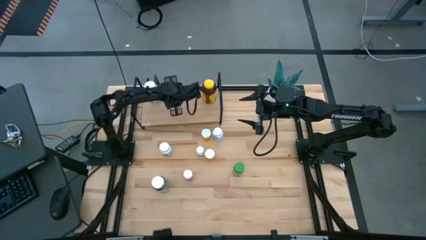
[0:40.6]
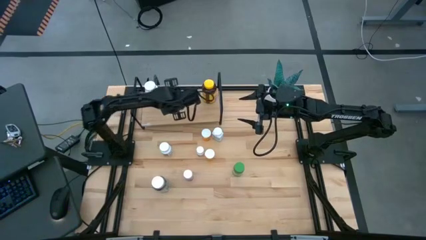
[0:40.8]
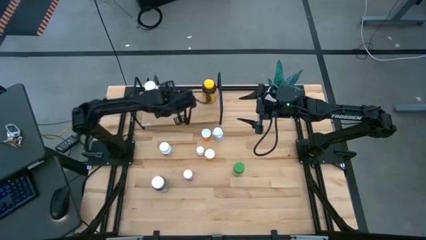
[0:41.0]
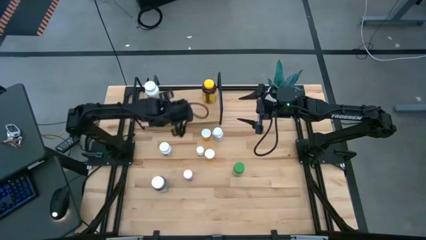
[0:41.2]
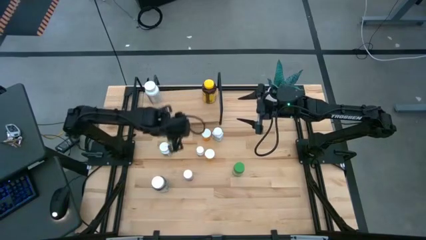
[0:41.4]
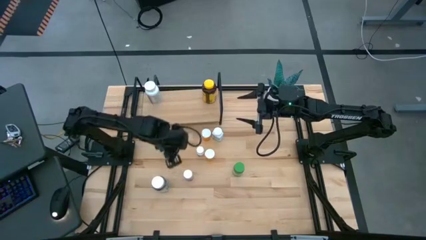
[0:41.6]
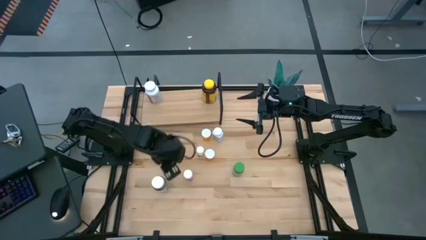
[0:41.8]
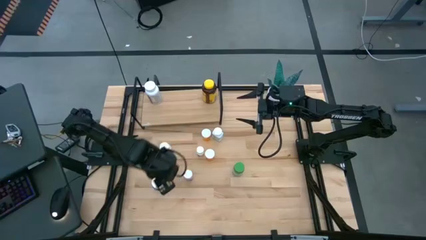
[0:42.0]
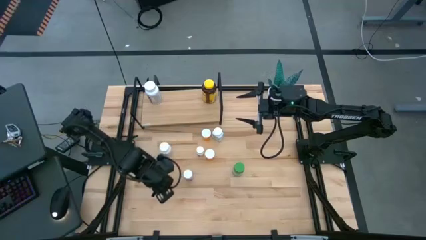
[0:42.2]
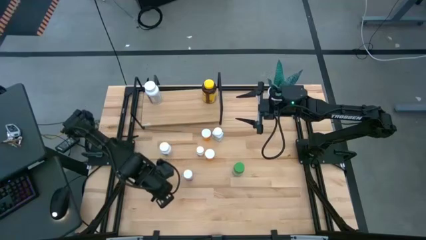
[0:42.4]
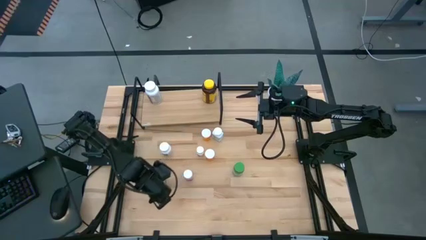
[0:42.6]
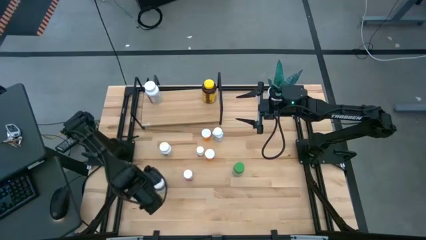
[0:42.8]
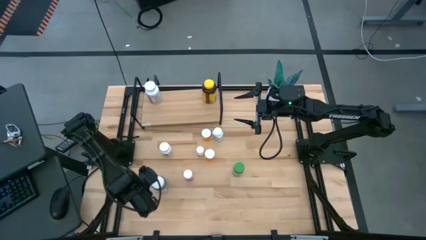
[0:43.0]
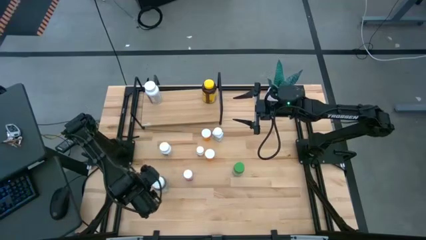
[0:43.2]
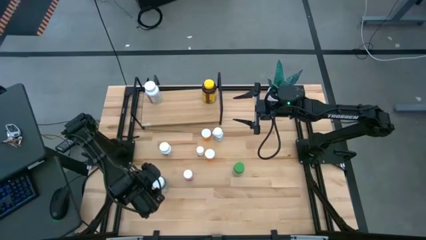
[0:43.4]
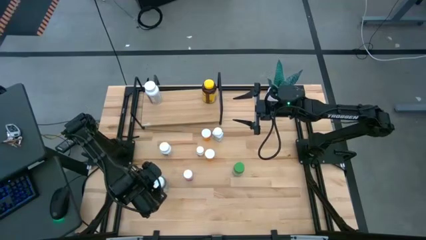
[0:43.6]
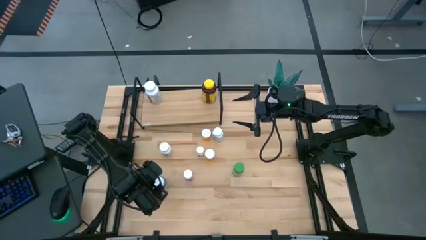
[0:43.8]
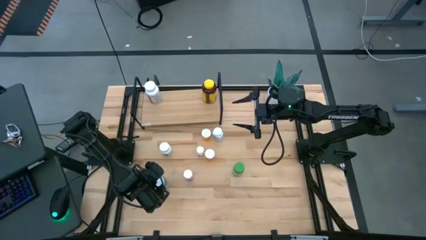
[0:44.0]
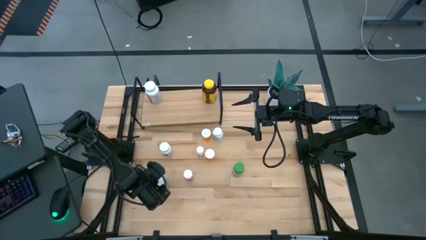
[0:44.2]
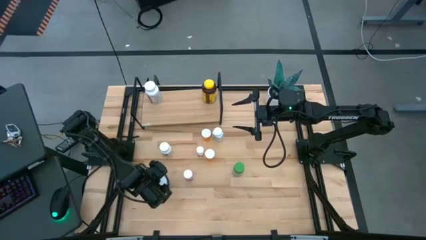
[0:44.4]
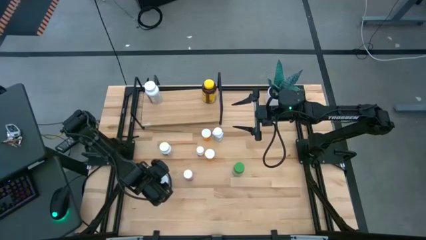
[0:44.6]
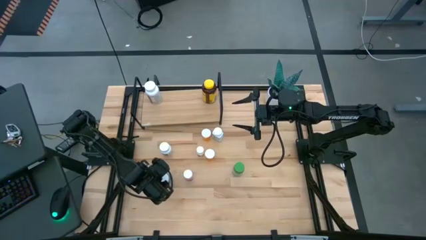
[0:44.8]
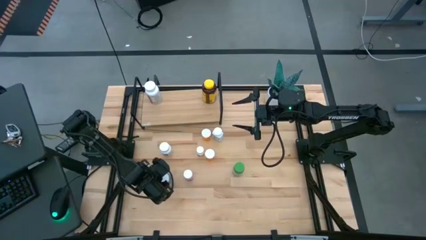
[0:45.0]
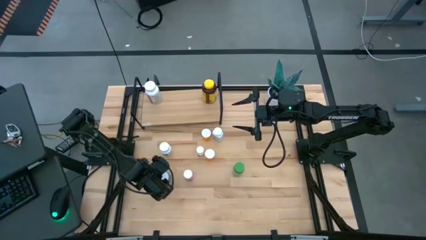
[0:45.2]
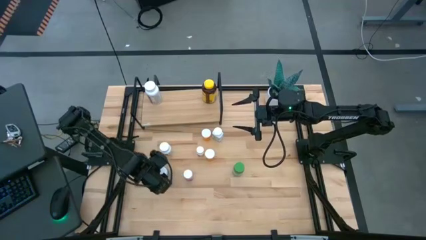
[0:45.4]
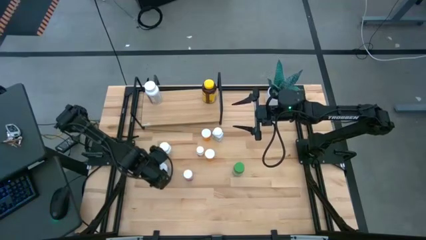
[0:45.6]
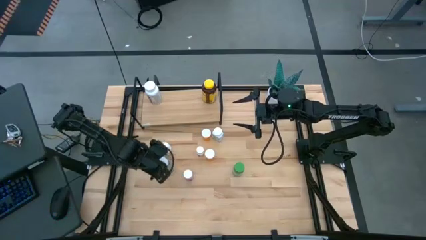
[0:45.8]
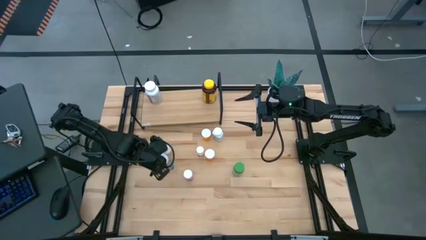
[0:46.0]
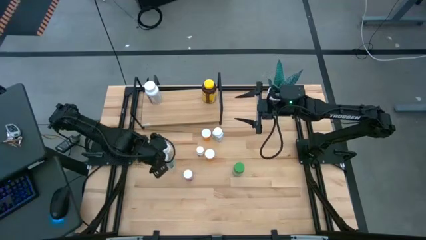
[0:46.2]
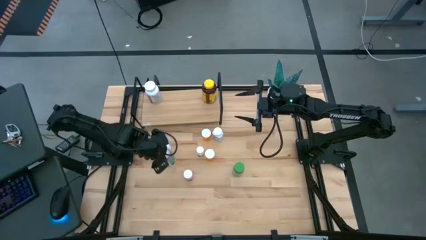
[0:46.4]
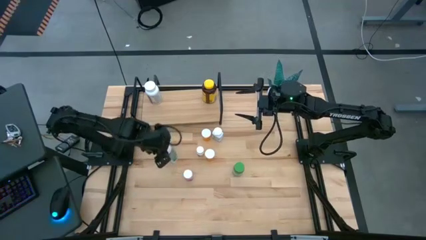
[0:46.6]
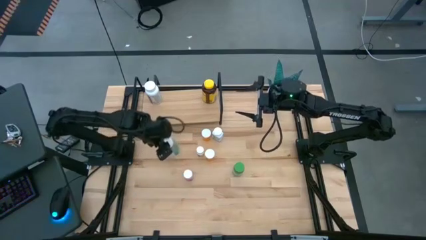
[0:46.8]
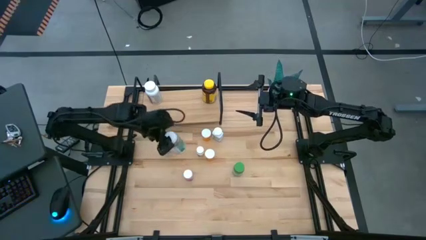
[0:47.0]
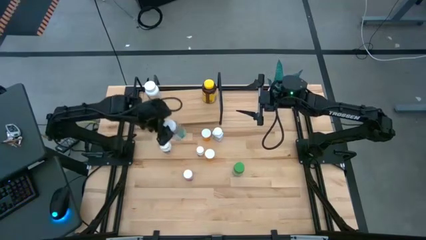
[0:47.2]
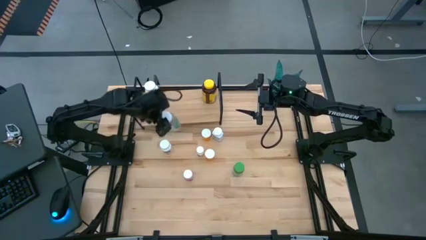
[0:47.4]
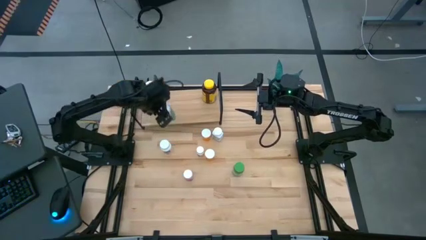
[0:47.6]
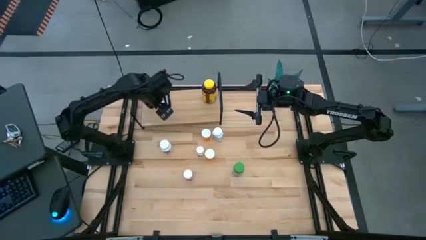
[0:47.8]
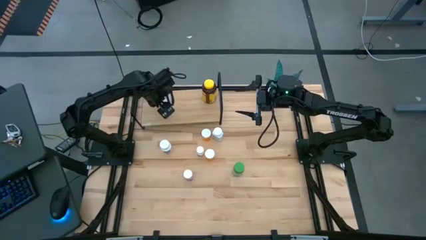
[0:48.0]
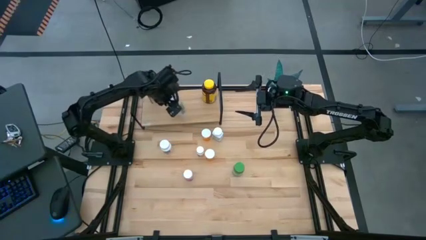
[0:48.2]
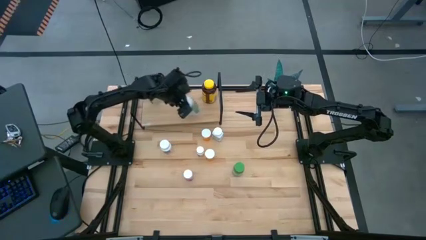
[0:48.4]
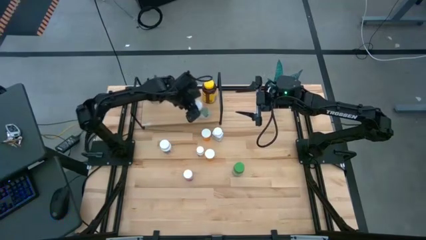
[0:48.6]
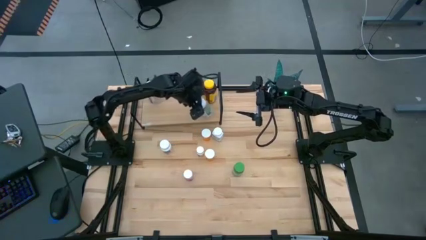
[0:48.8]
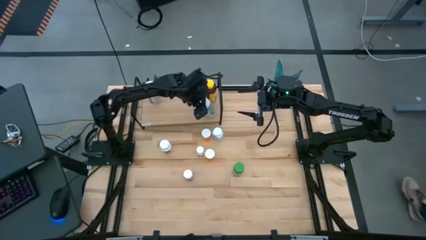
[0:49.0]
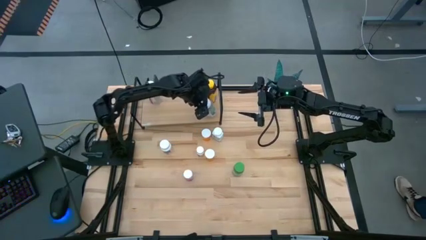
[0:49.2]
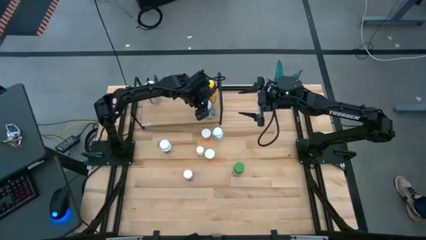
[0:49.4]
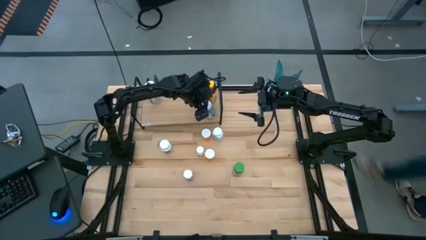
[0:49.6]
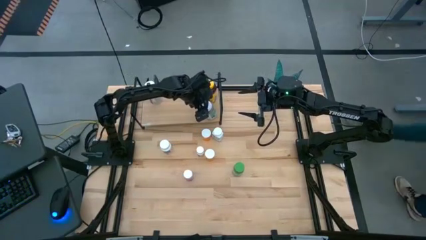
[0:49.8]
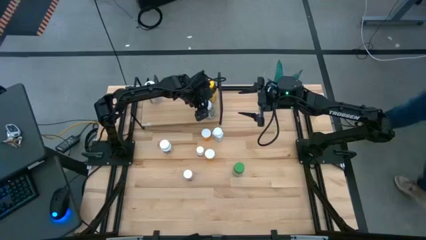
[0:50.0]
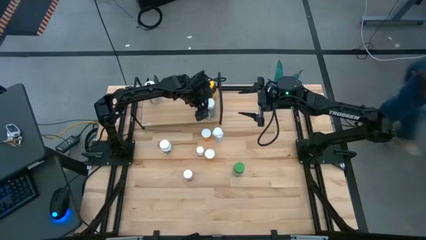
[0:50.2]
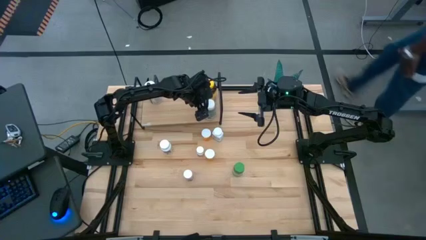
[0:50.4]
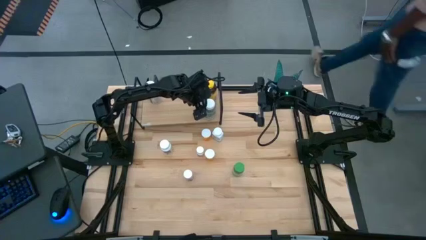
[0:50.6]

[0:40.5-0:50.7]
Task: Pick and place medicine bottles onto shelf by color
Put the green pill bottle on the shelf

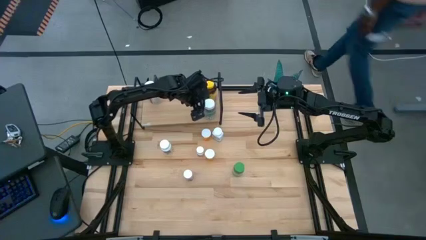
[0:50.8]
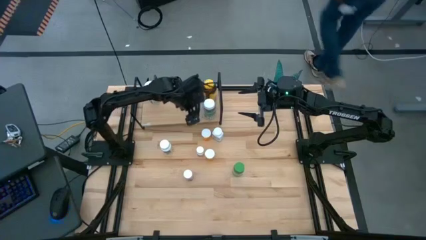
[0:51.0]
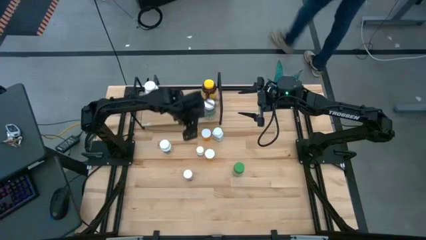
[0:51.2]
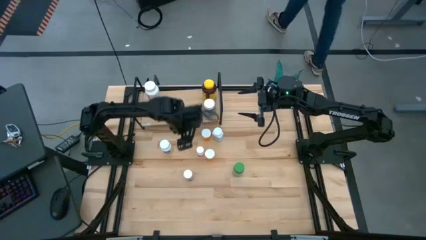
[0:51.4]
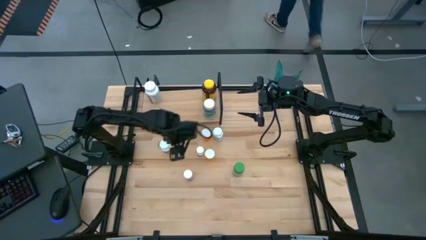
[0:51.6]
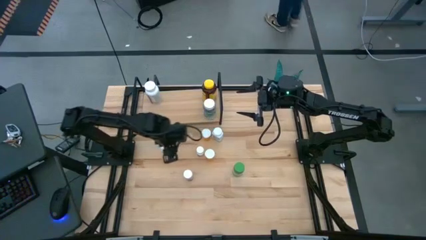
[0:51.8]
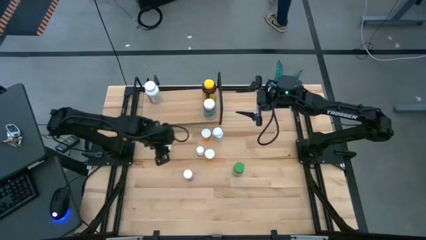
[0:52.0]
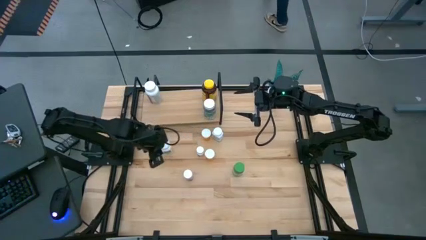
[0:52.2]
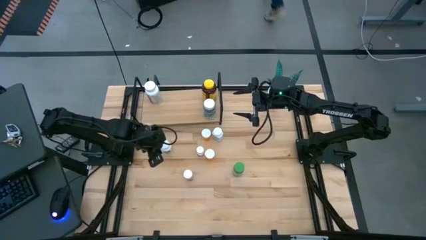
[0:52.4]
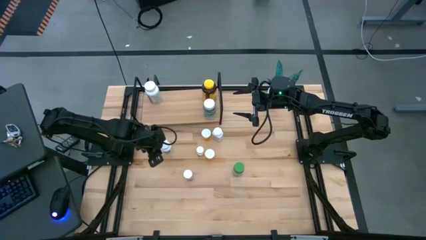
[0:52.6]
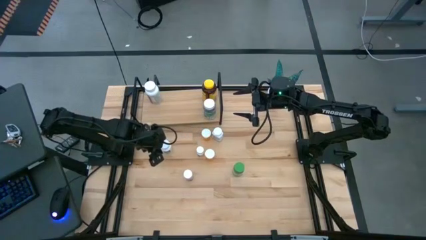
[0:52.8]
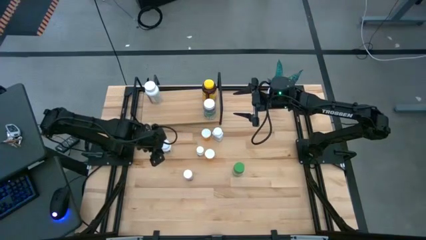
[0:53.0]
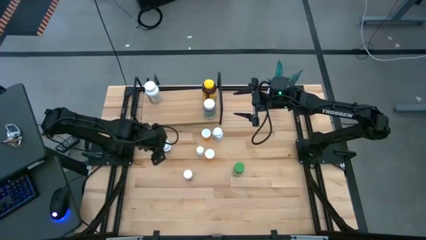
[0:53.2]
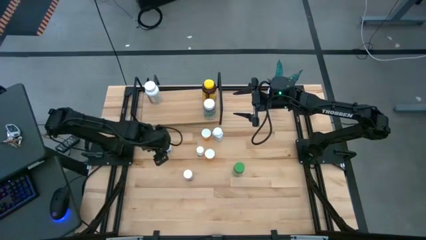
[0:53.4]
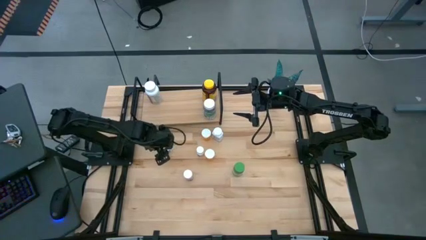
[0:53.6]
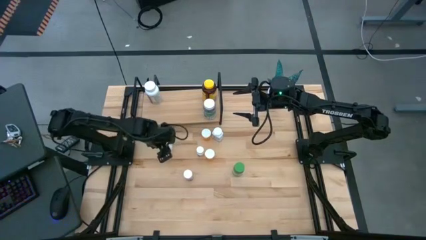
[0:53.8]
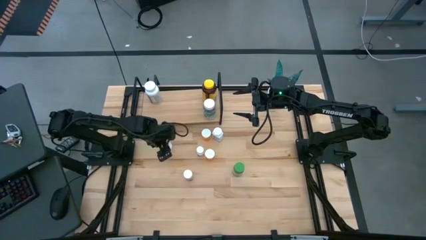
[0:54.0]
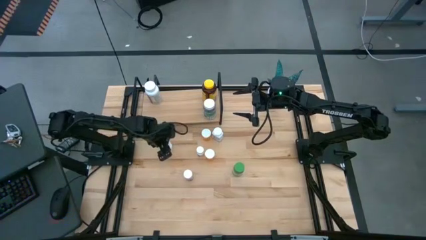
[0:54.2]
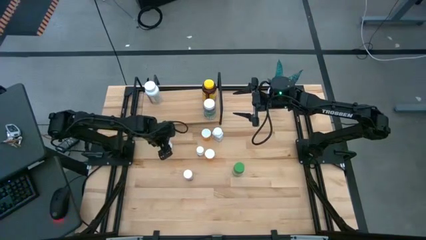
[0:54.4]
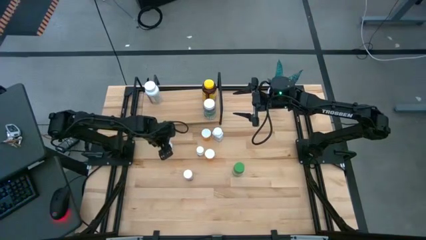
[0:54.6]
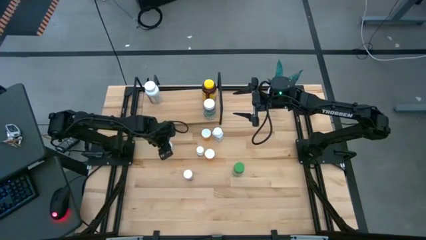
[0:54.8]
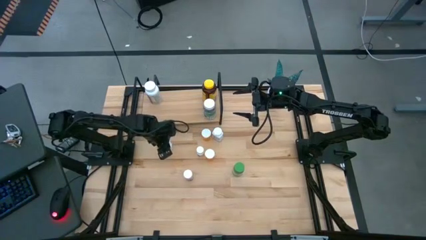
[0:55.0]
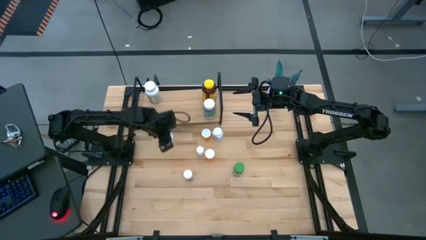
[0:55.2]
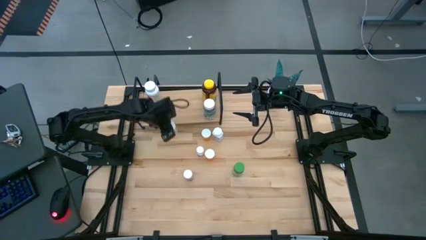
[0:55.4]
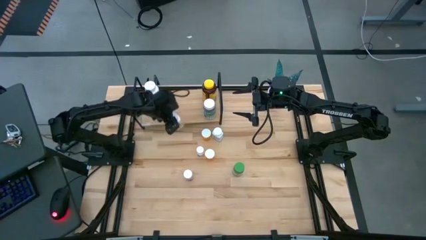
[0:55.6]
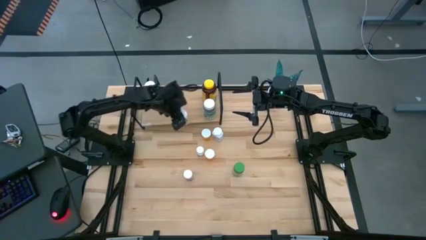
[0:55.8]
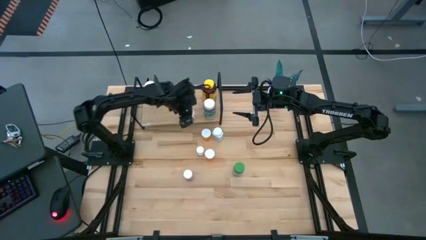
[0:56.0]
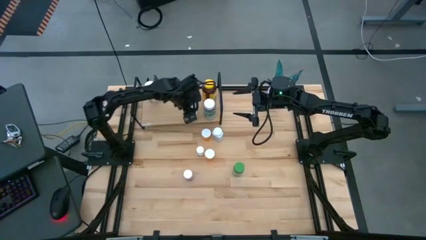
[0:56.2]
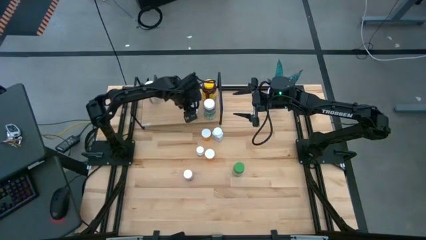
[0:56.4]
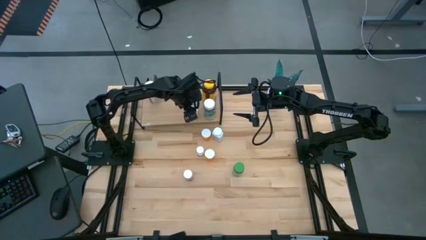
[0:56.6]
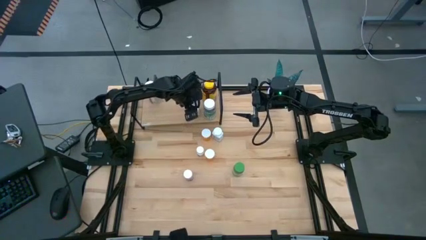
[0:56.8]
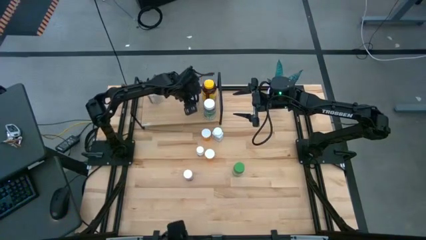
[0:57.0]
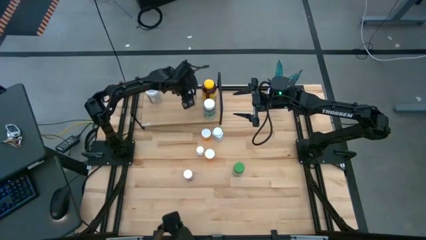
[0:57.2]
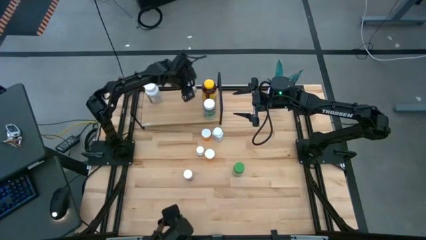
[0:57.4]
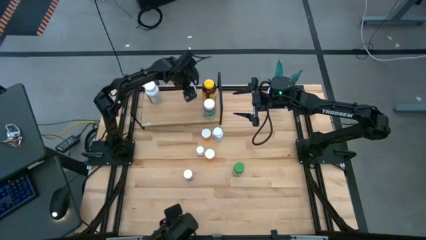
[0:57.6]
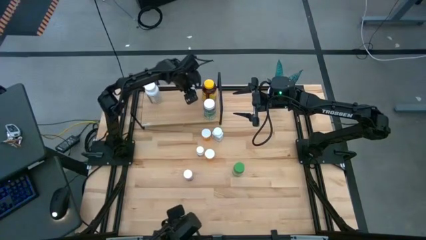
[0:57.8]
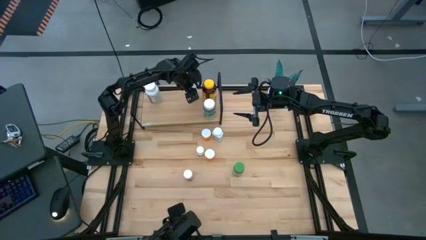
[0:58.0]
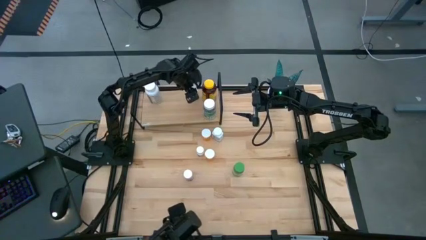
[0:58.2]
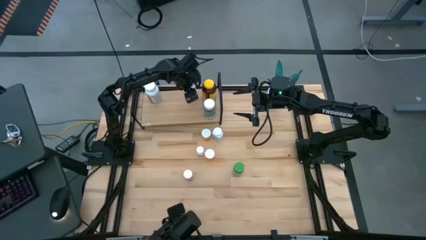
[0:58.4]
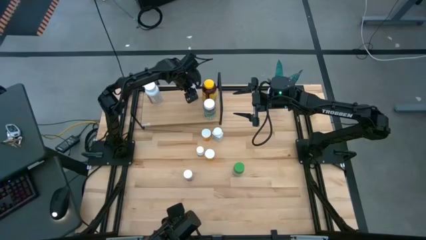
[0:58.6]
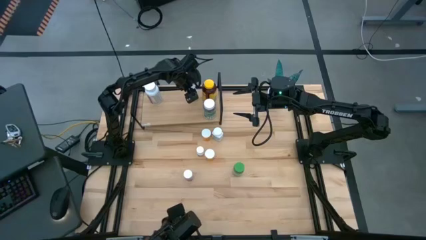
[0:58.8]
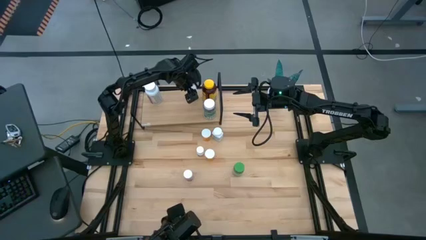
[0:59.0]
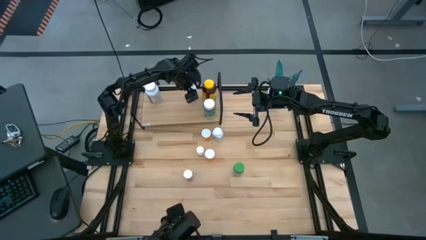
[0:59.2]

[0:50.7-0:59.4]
Put the large white pill bottle on the shelf
